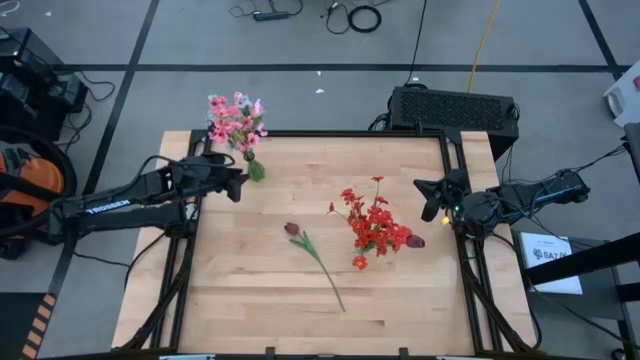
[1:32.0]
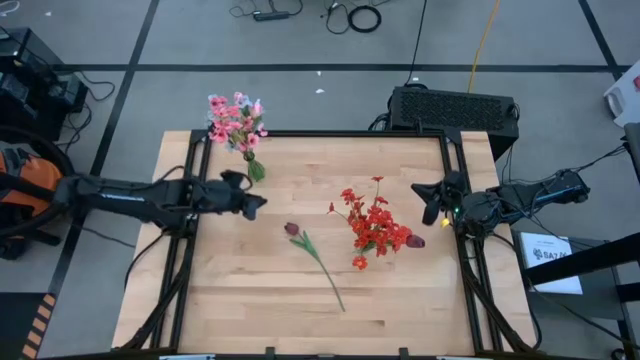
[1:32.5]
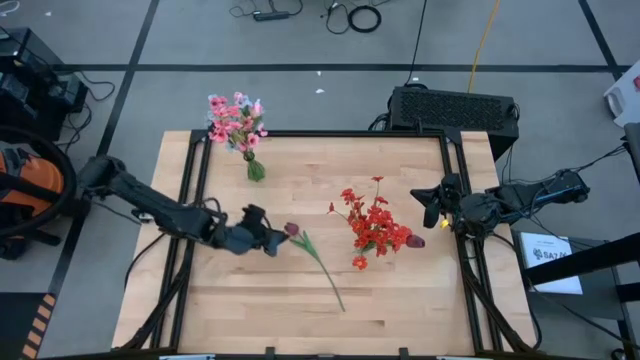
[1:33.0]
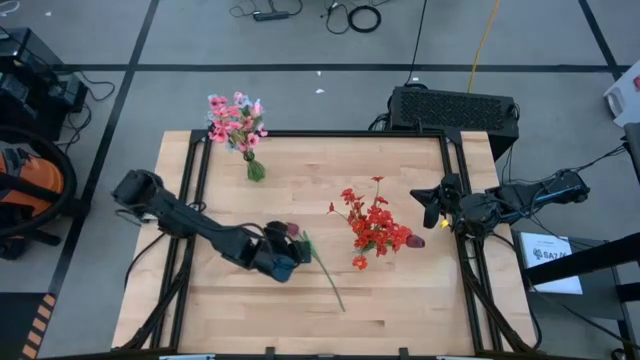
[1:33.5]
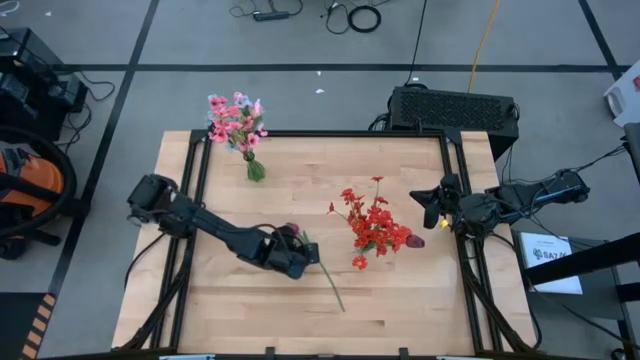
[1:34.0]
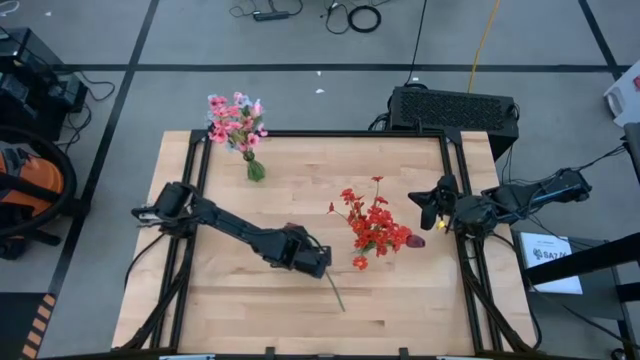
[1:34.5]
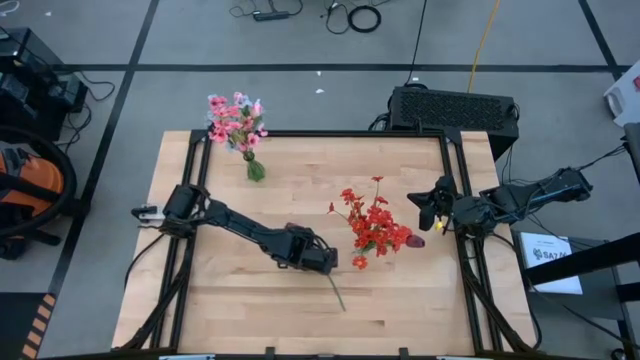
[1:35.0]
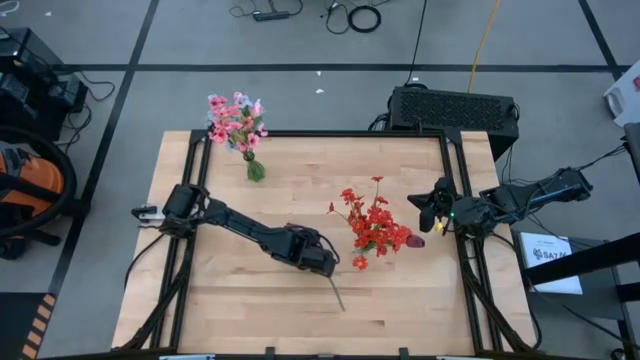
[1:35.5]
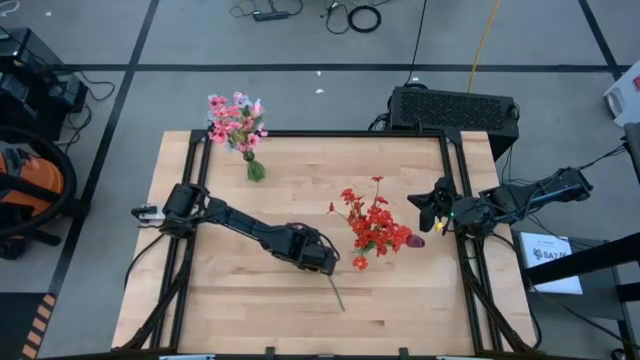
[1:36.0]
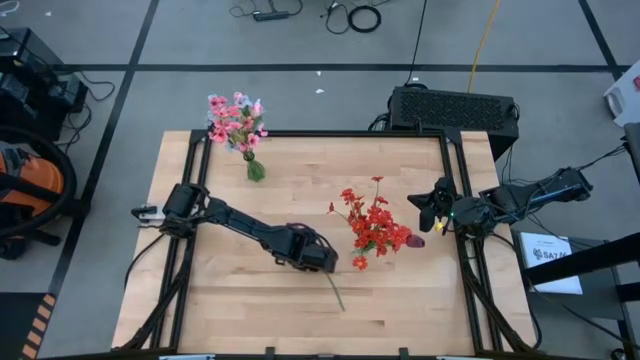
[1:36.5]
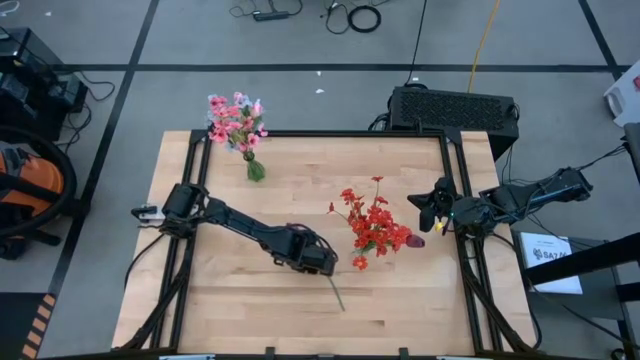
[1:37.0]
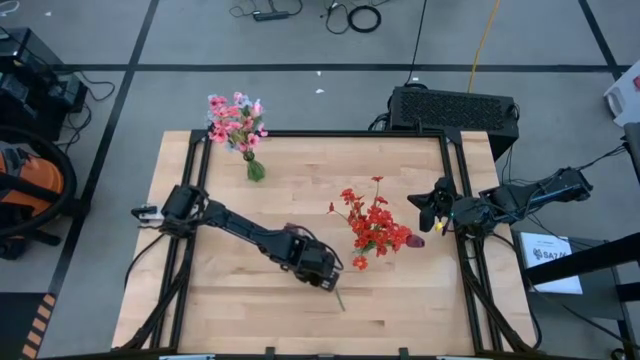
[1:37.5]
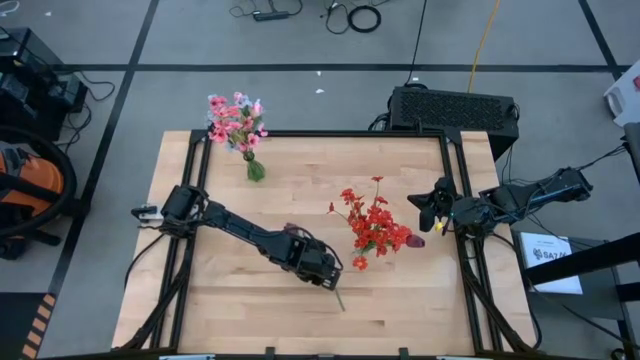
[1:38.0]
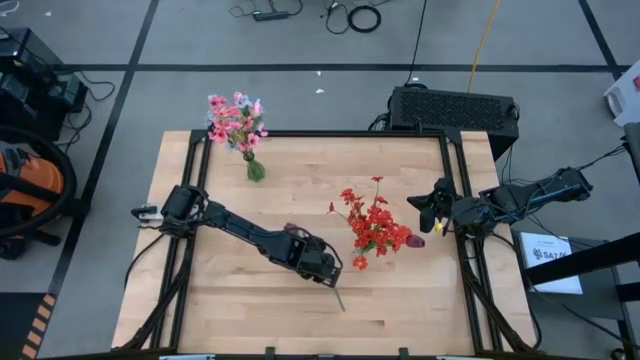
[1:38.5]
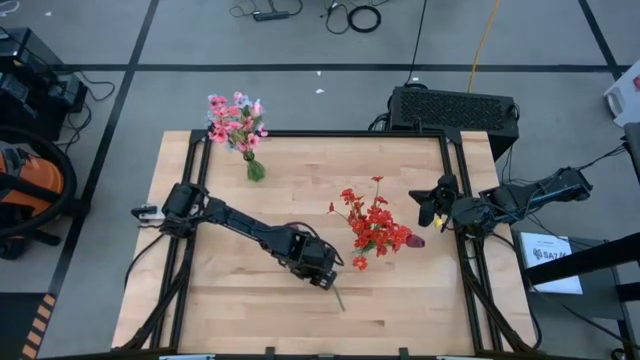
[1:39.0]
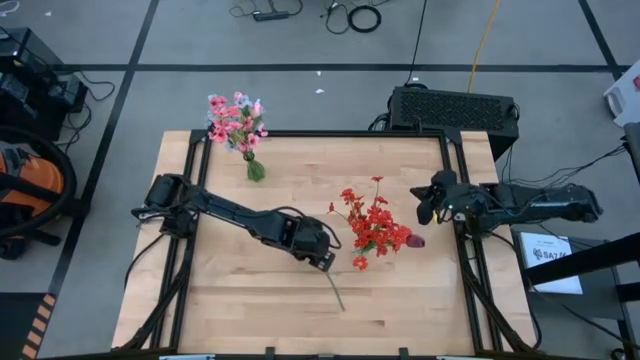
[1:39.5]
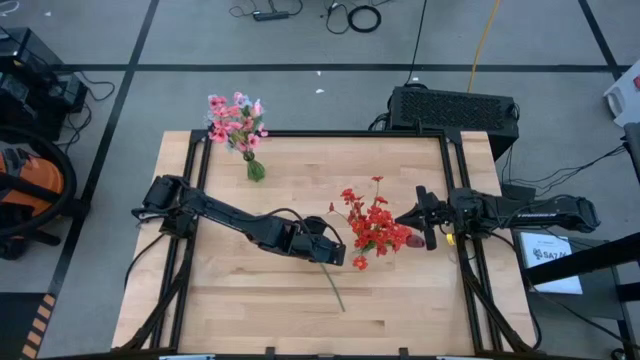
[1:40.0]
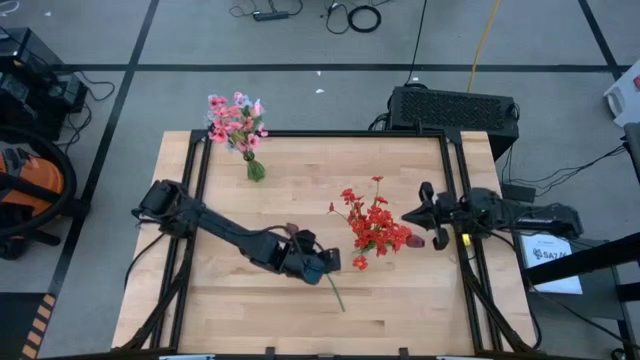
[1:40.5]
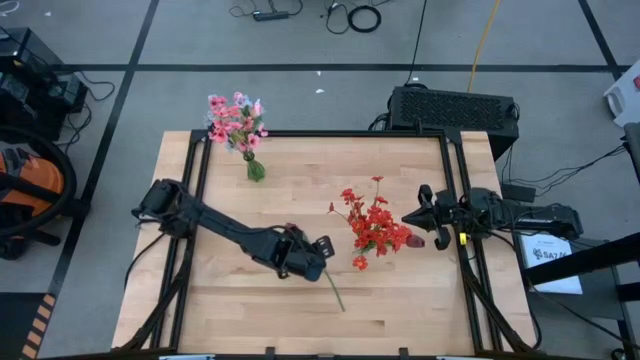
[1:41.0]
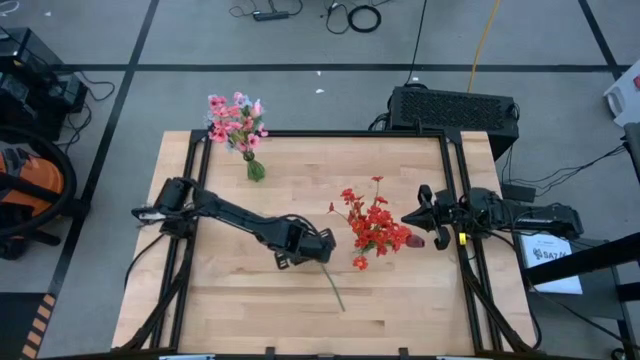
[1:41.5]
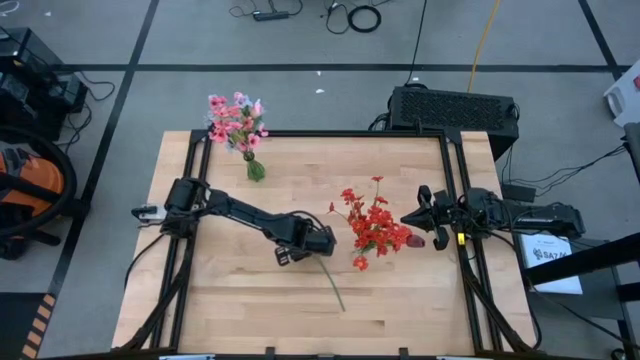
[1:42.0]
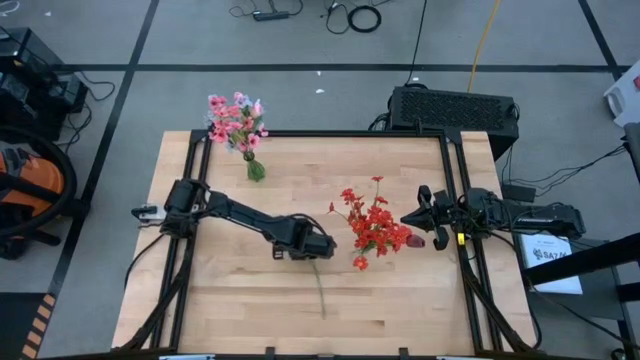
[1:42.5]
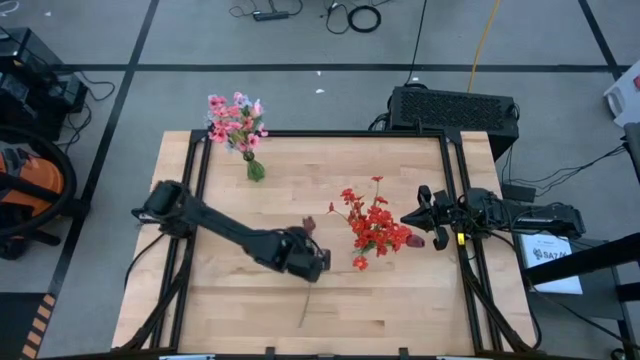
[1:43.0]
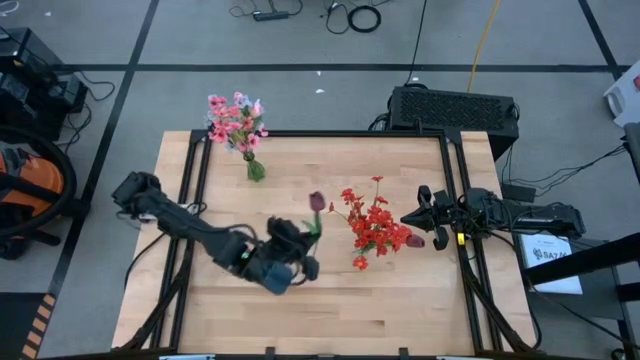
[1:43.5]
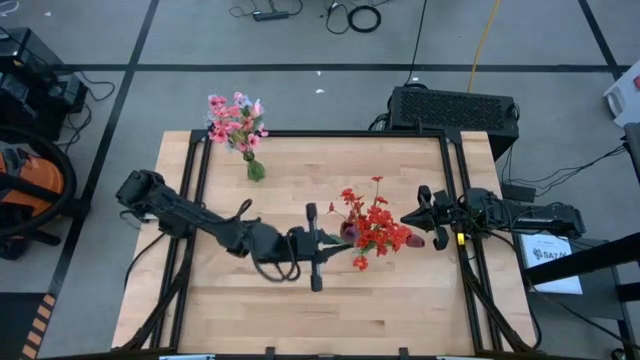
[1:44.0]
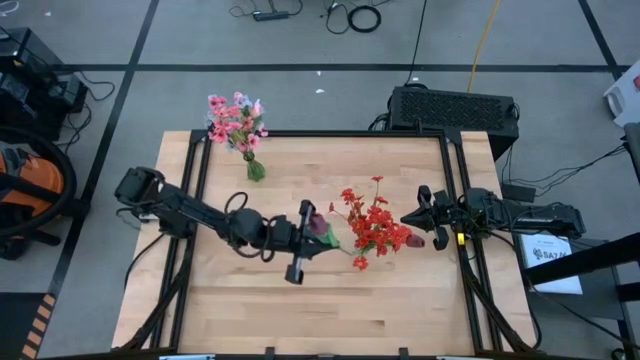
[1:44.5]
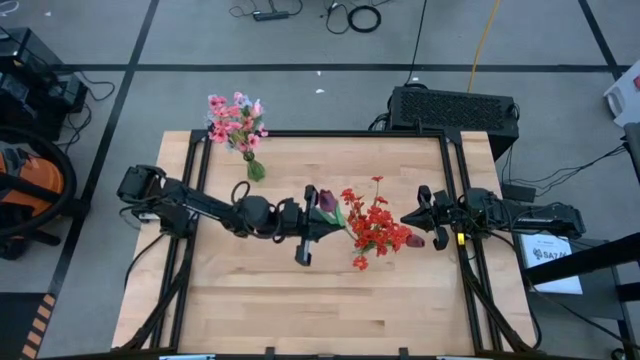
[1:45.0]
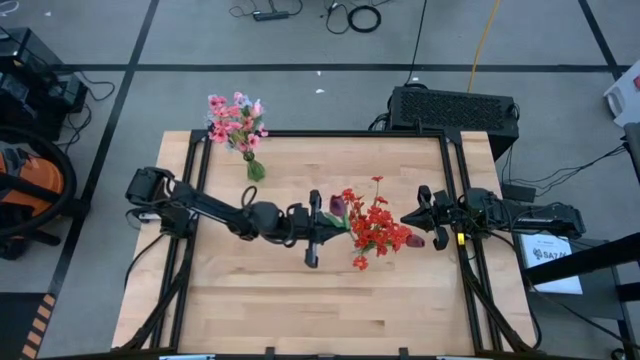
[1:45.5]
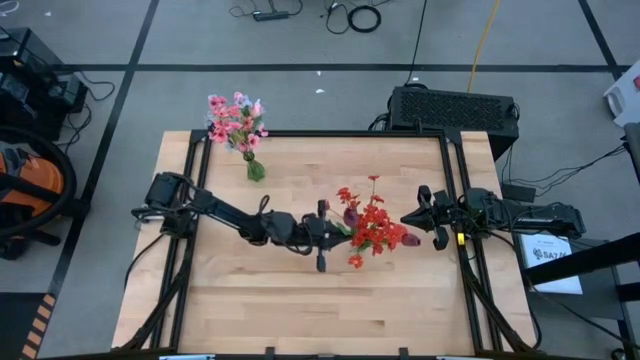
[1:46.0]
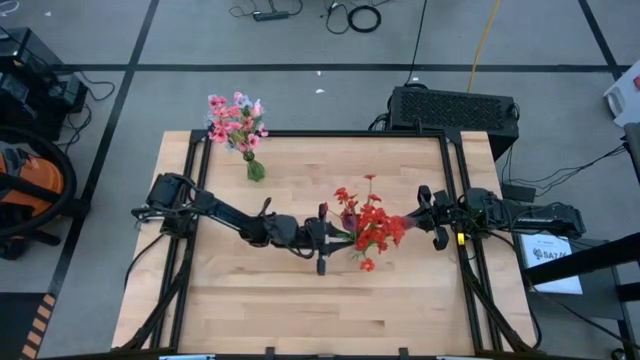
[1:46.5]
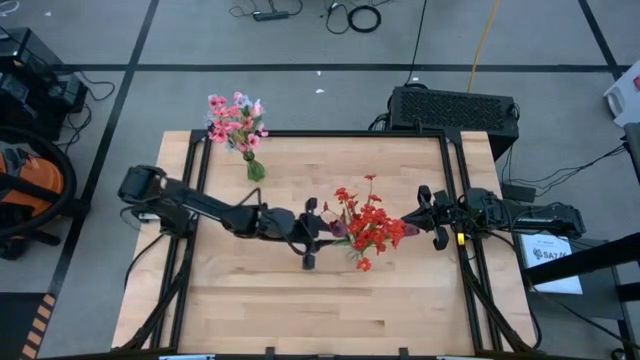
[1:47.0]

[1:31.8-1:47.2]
Task: Sort flowers into vase by color
Put the red flower into the transparent vase

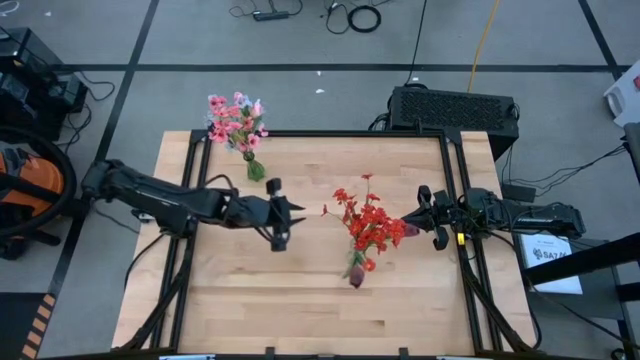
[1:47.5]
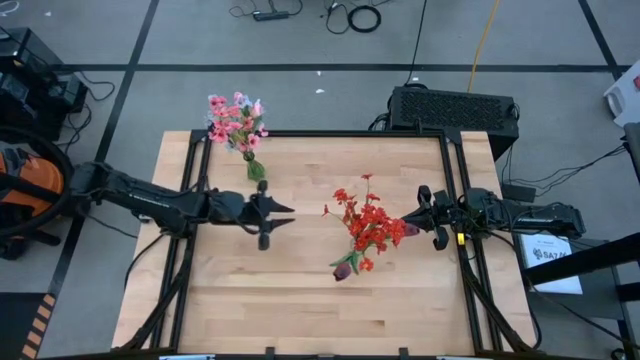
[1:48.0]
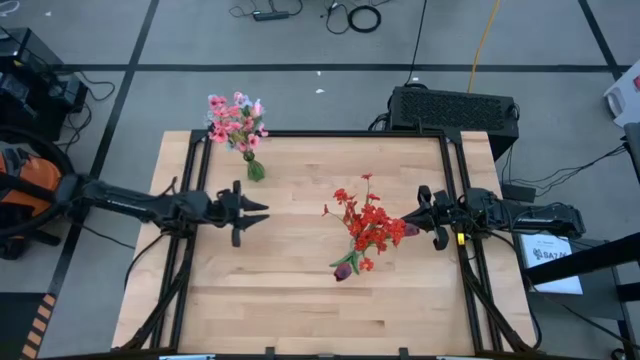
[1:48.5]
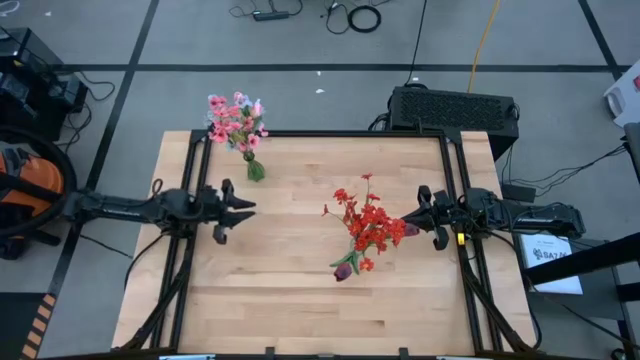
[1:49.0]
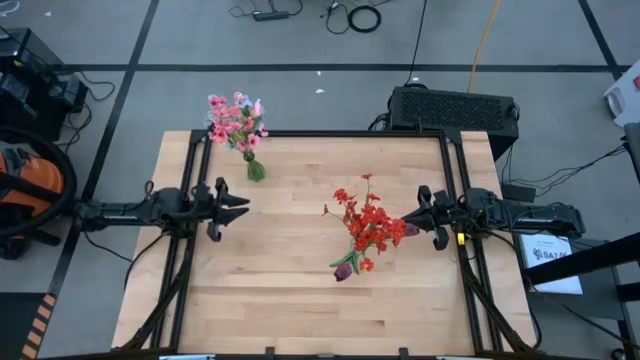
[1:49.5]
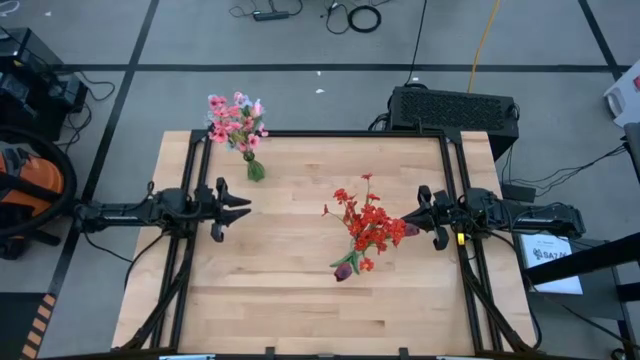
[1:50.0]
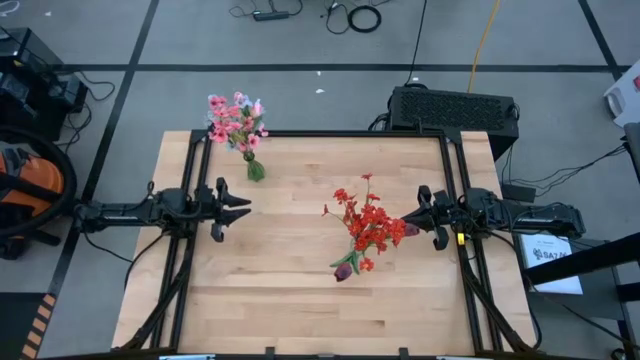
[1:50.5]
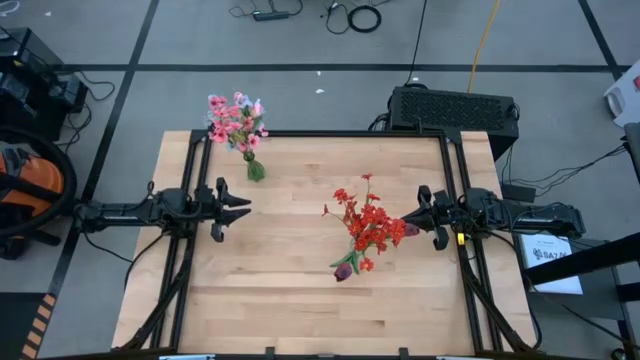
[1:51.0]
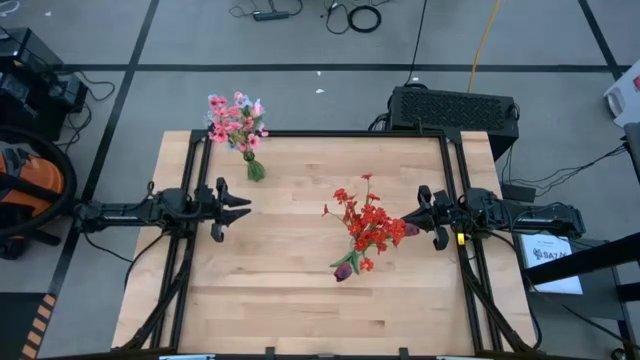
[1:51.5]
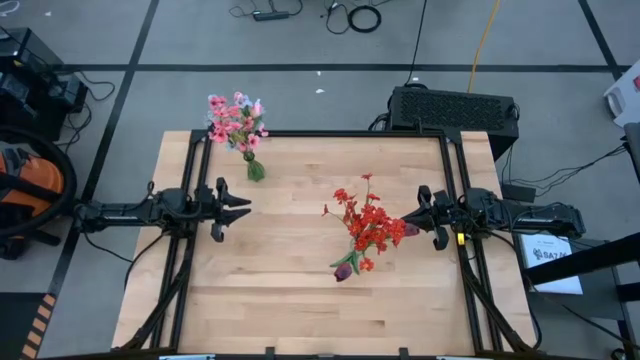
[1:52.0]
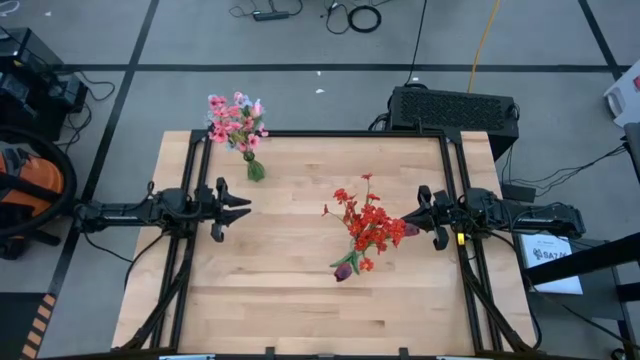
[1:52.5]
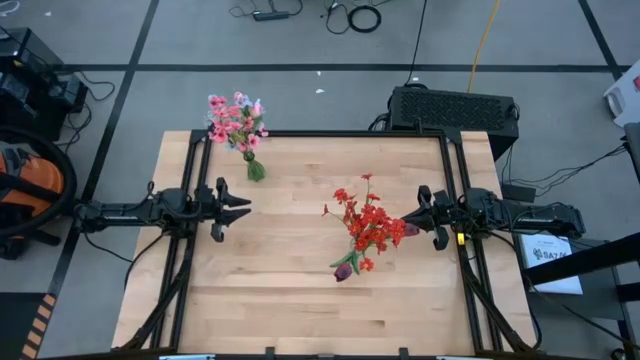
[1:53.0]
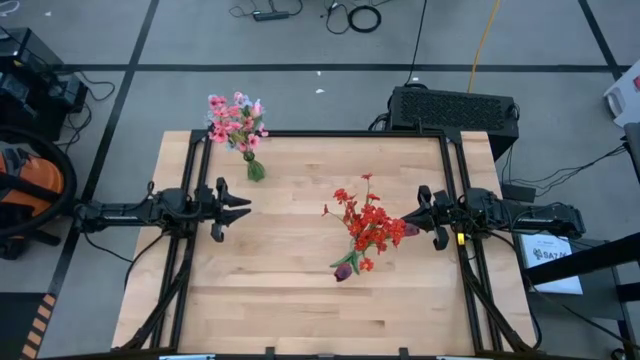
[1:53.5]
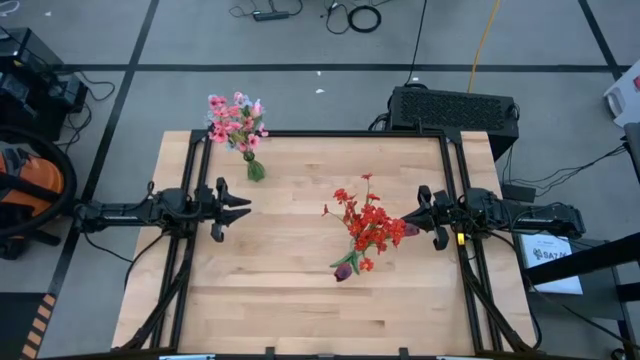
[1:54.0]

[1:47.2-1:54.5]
Return to Home Position
